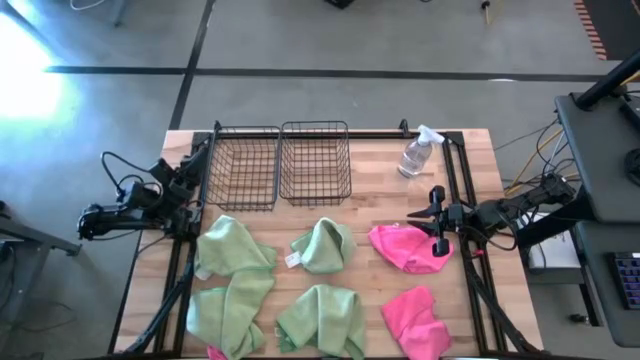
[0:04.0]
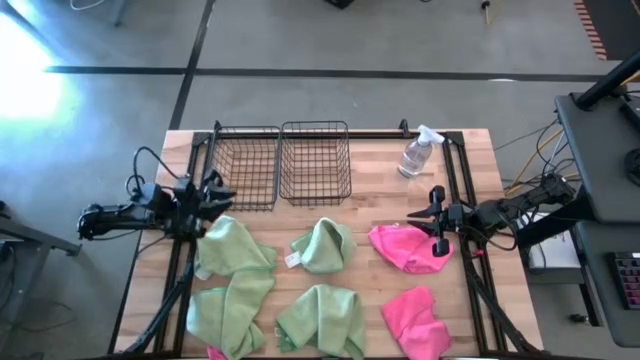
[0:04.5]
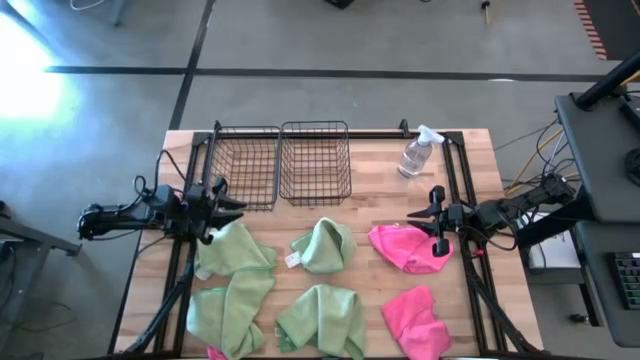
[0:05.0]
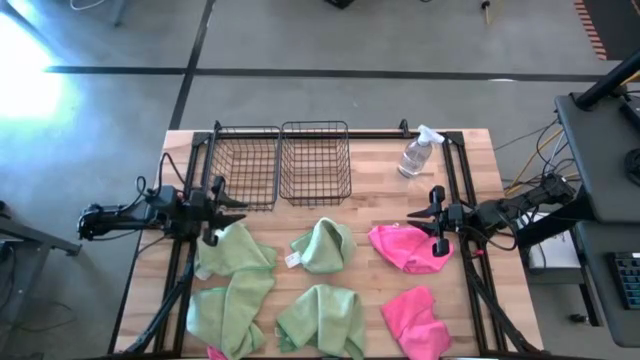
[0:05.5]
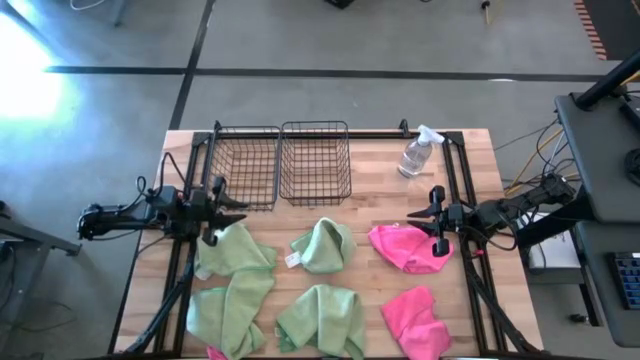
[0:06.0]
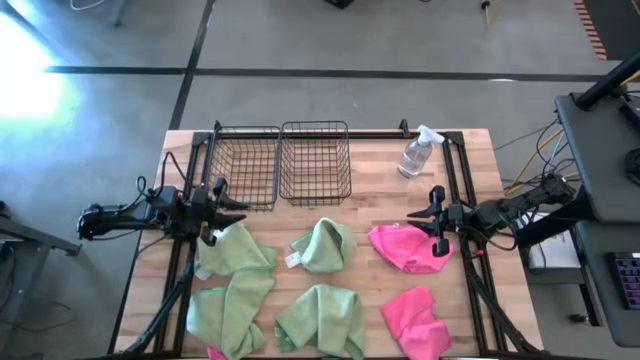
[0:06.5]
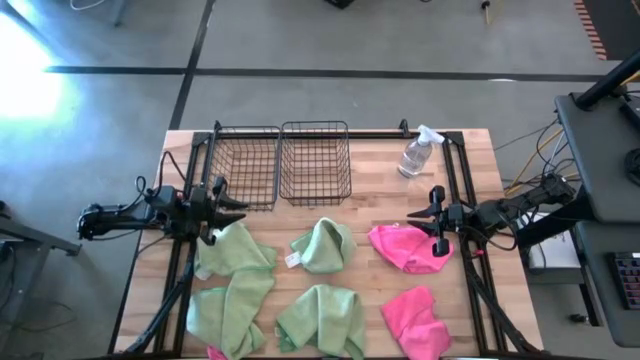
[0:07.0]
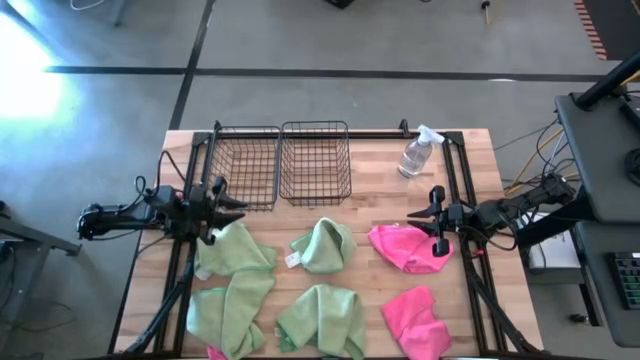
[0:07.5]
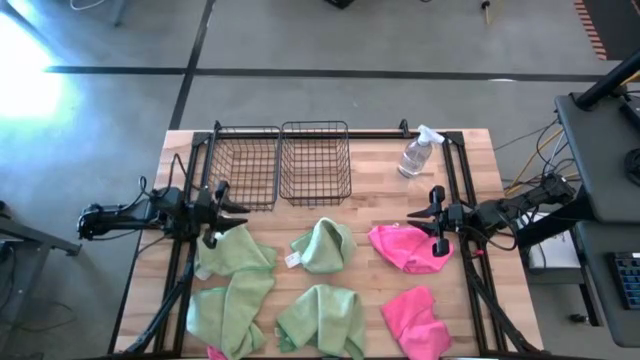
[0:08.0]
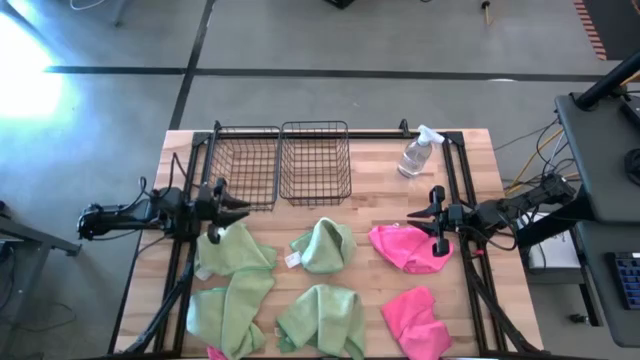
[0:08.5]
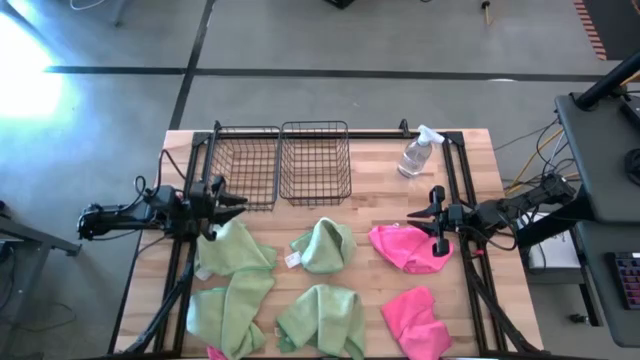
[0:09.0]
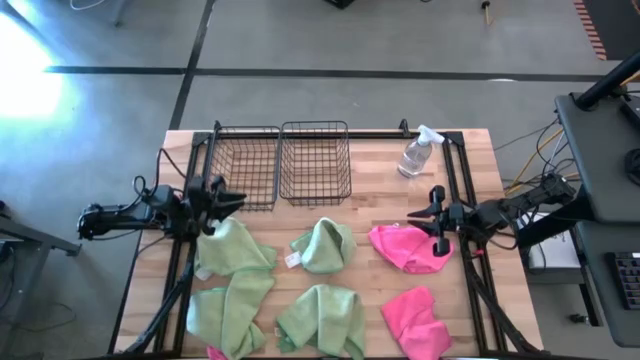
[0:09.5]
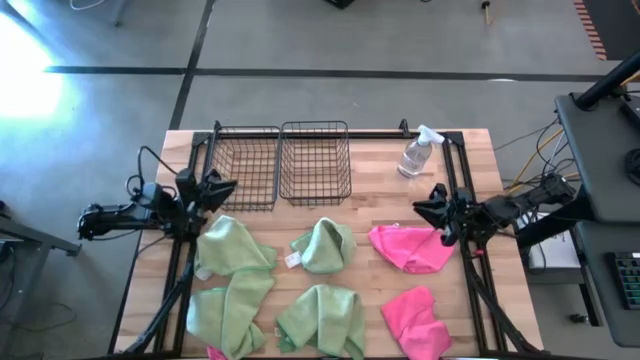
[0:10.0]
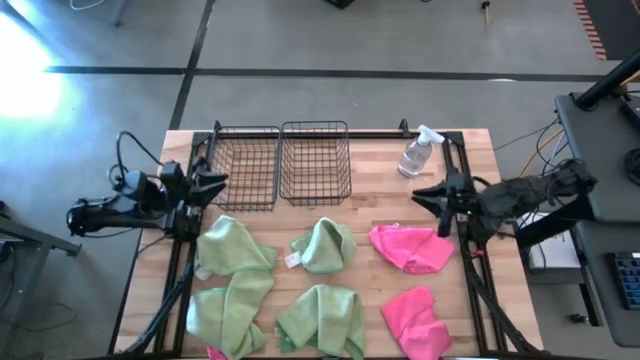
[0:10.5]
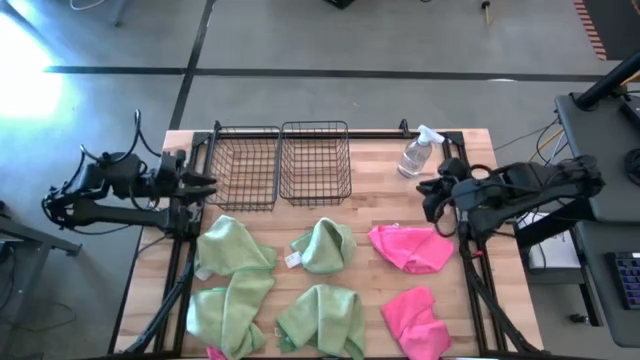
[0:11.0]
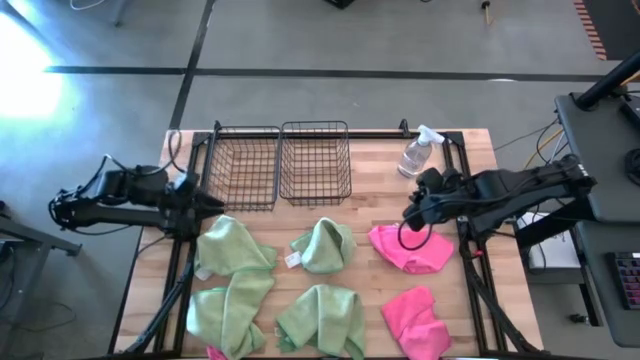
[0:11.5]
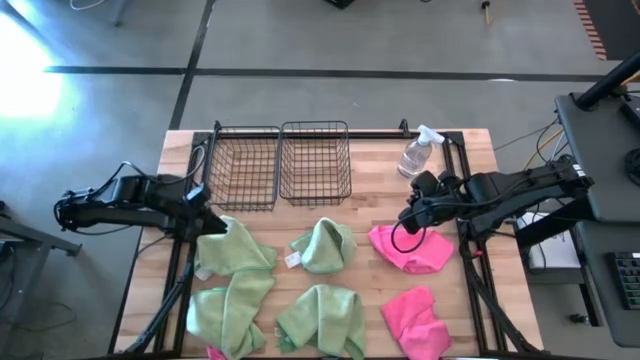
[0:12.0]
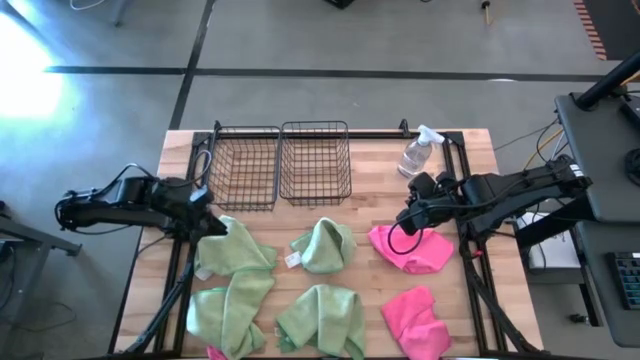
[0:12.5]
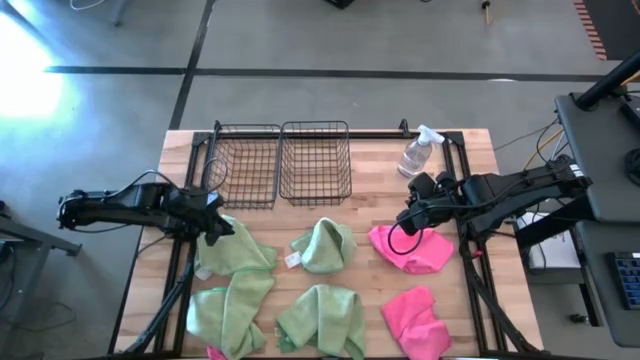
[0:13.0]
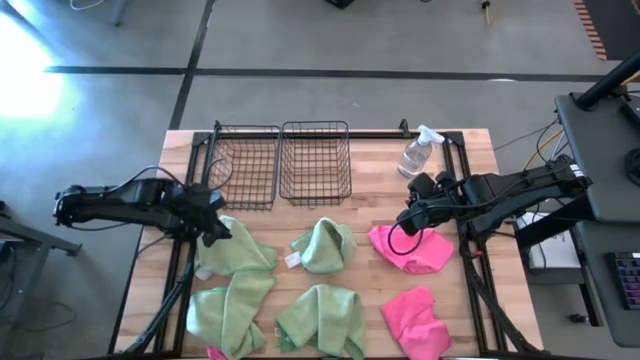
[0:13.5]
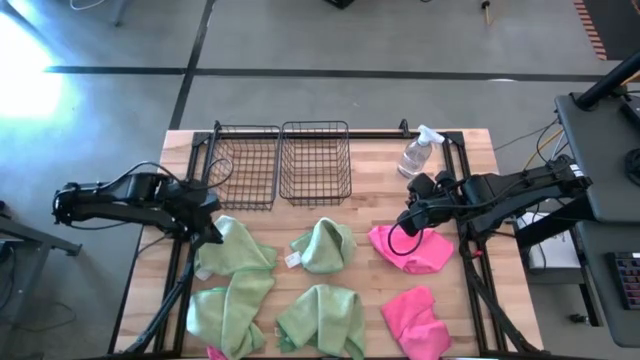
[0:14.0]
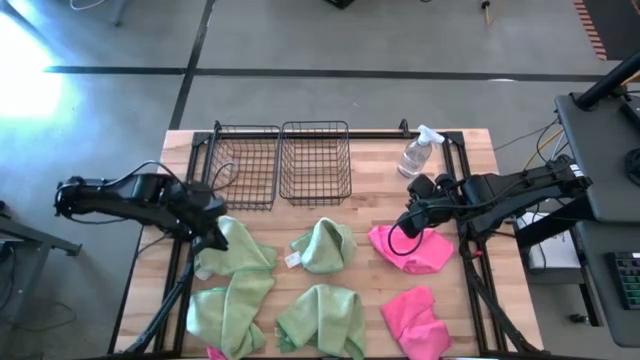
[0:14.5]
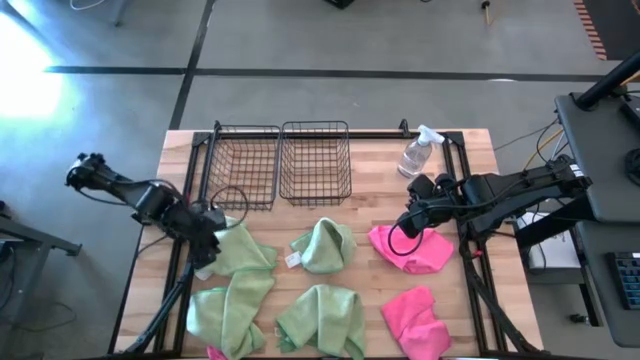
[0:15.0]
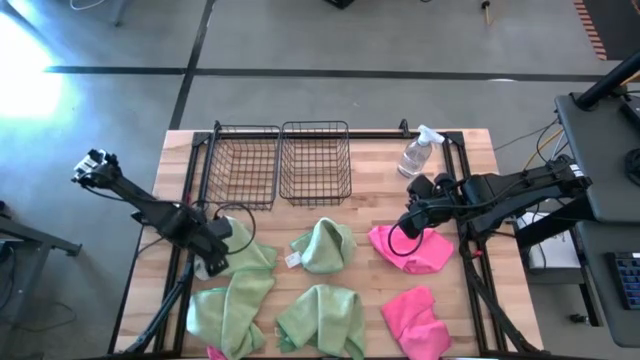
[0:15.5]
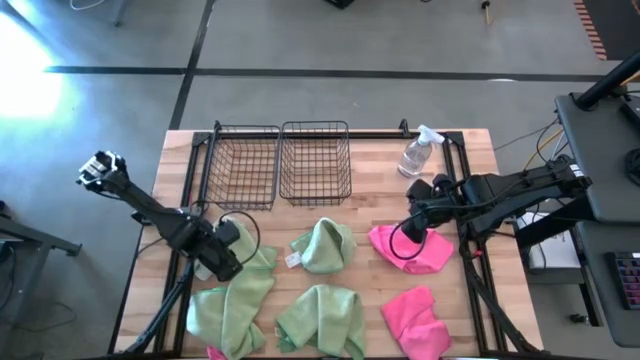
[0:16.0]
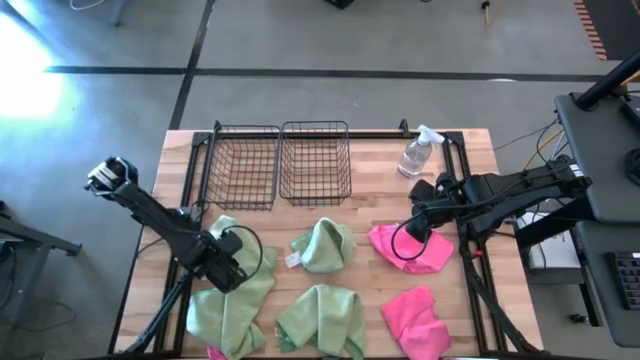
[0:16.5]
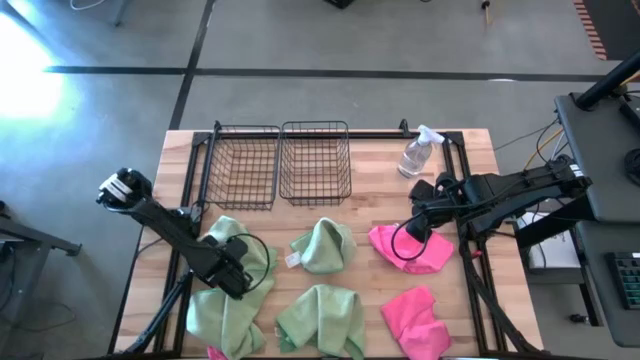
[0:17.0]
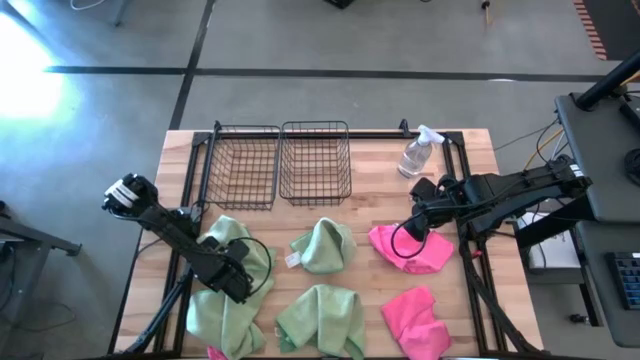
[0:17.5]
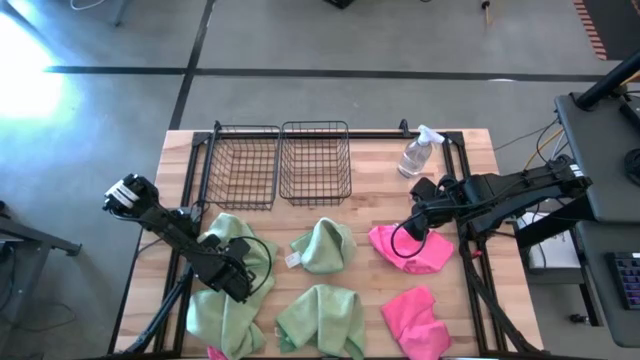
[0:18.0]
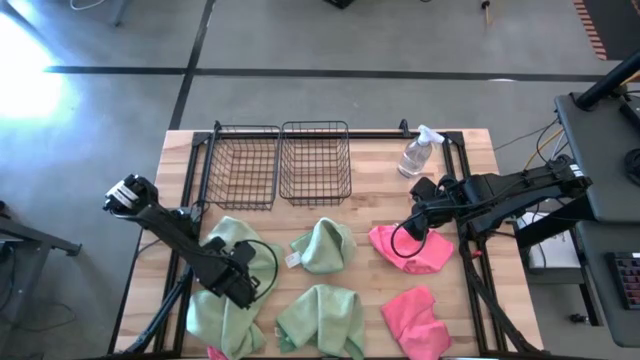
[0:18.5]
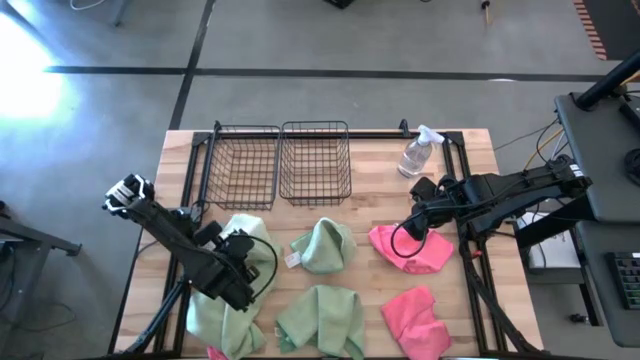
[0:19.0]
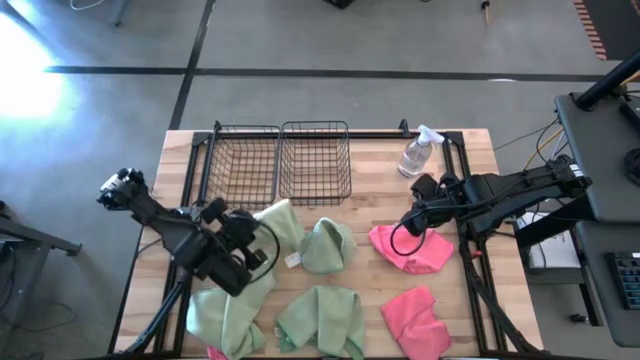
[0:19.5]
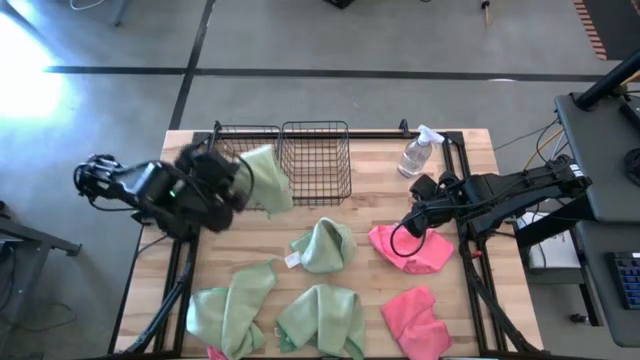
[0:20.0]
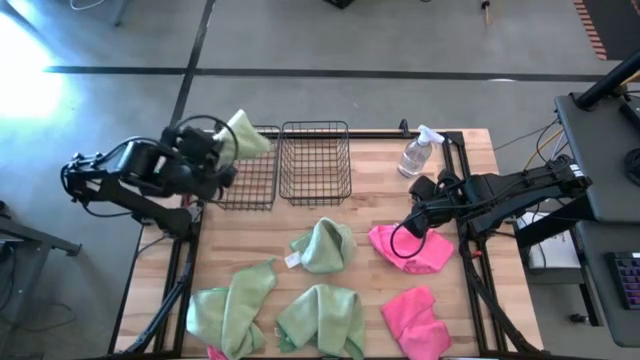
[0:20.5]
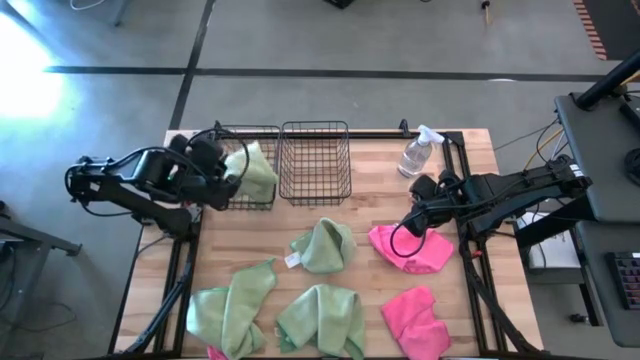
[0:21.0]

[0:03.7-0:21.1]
Task: Sort microfiber towel by color & place in baskets
Put the green microfiber cloth into the left wire basket

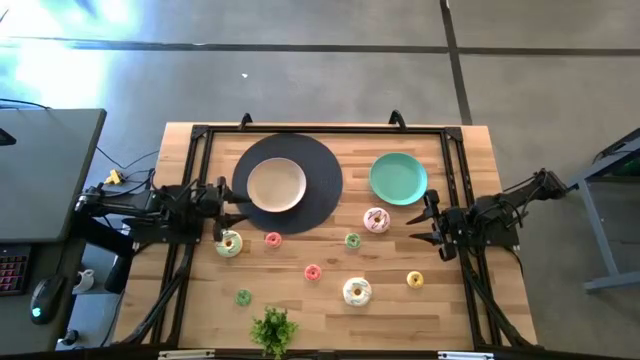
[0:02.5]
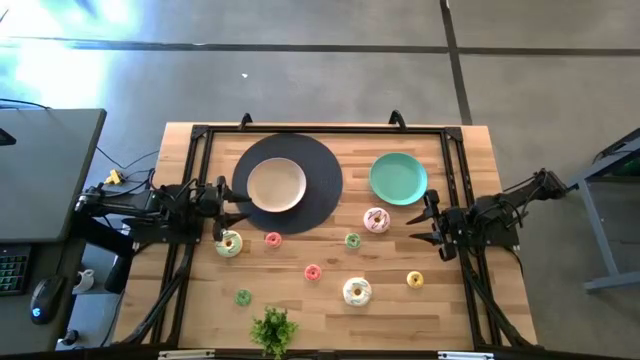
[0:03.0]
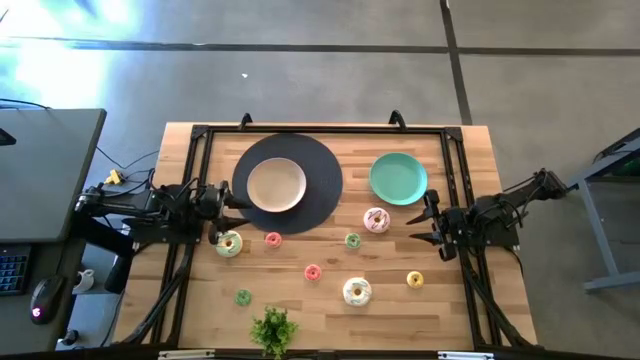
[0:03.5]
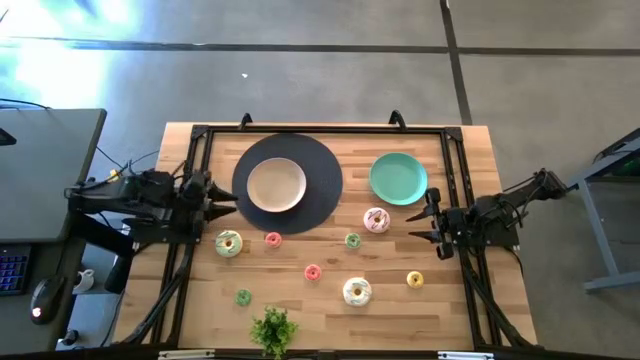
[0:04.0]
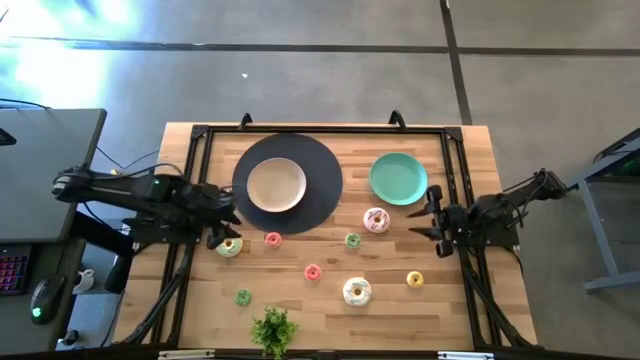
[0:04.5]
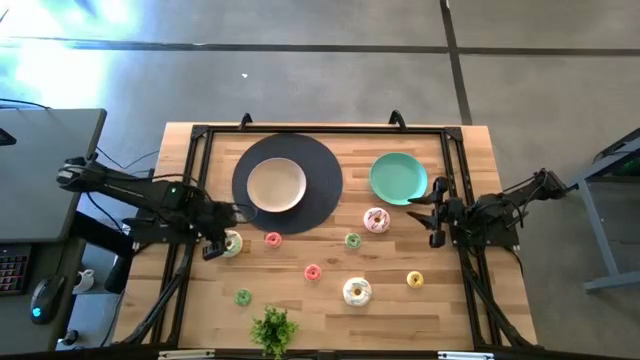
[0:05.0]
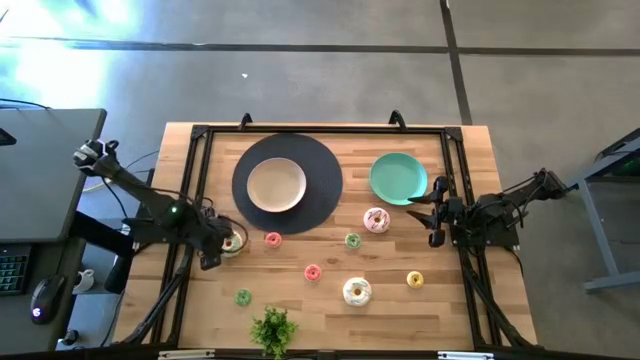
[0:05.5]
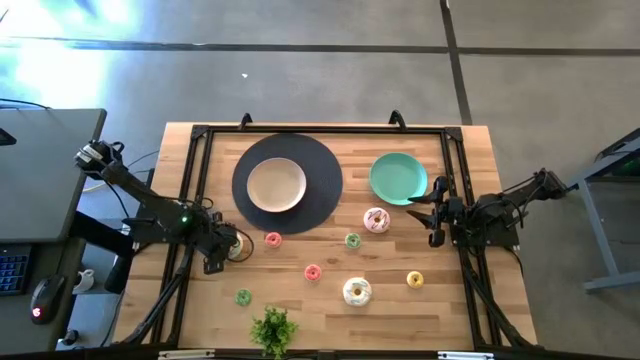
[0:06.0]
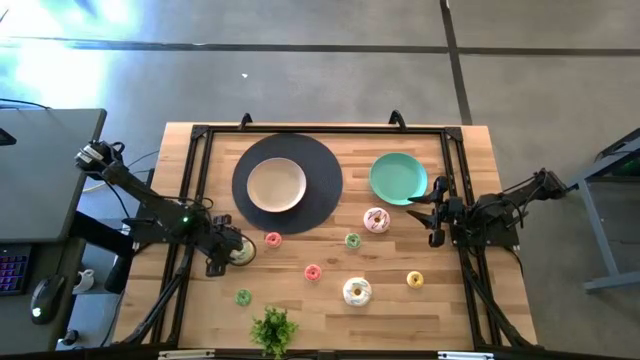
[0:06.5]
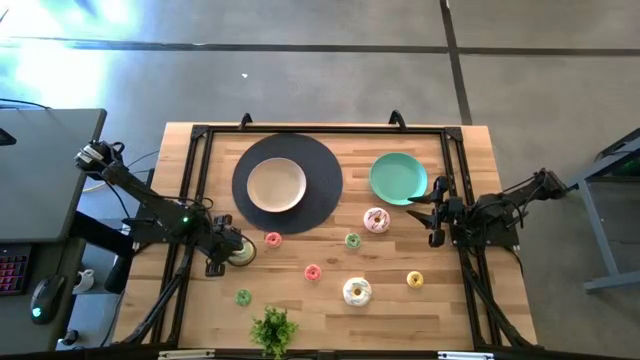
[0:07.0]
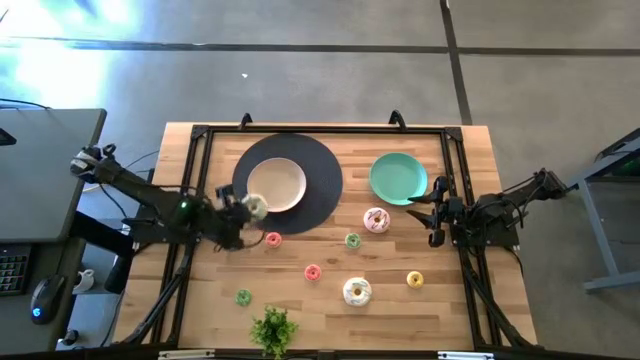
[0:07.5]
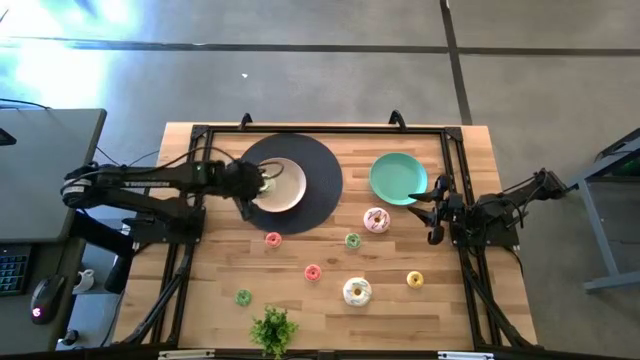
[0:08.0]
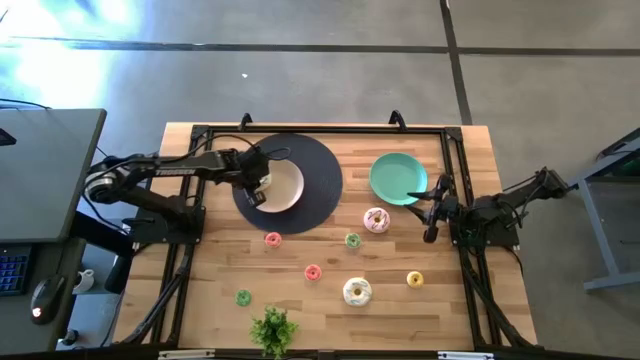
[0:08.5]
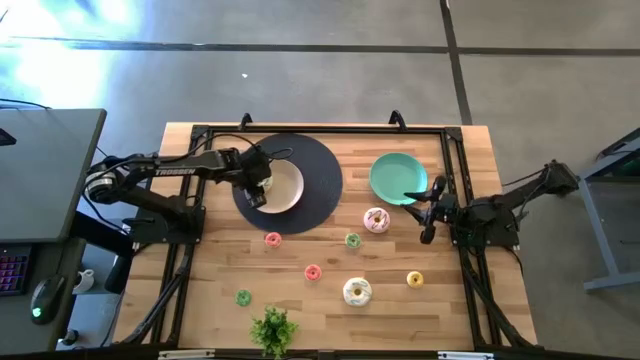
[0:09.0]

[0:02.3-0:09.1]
Task: Pick & Place donuts
Put the big blue donut on the white plate
